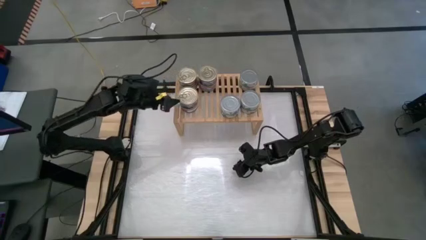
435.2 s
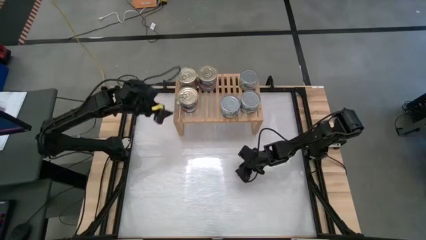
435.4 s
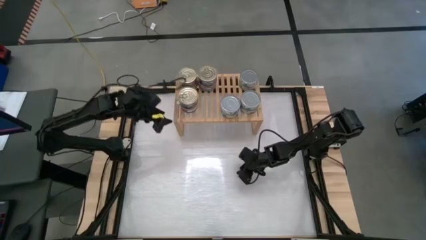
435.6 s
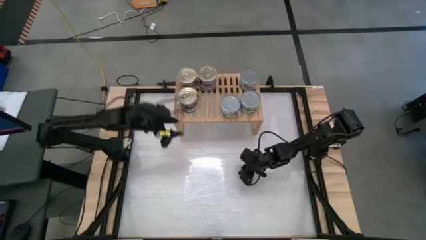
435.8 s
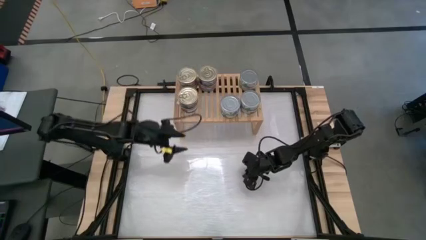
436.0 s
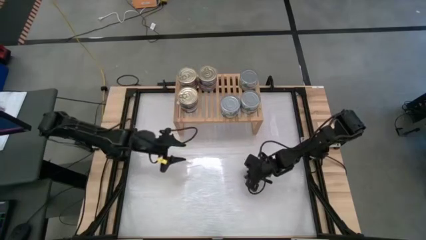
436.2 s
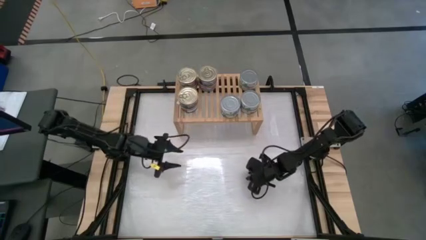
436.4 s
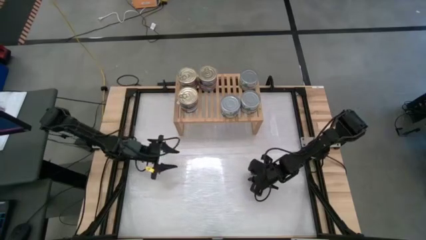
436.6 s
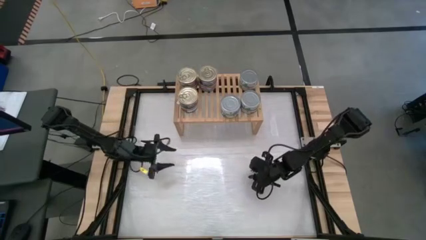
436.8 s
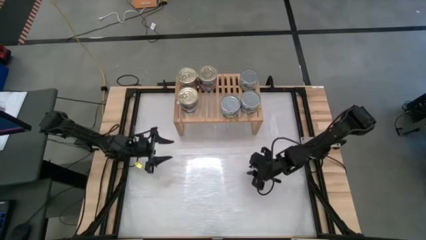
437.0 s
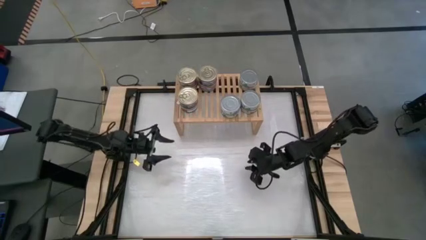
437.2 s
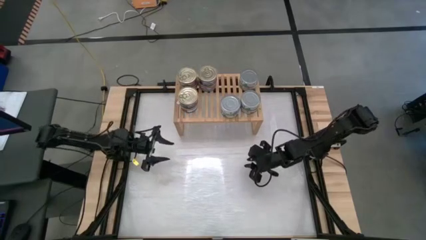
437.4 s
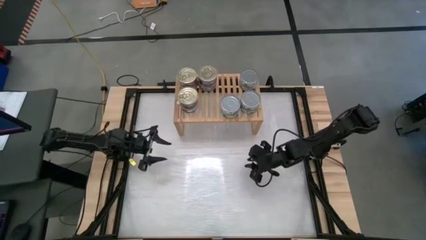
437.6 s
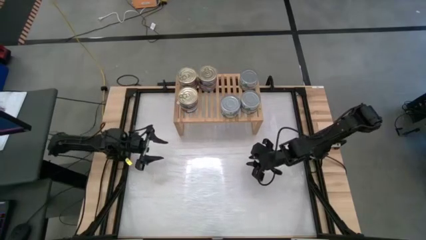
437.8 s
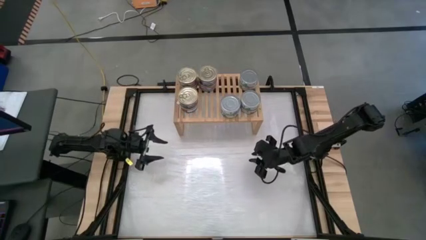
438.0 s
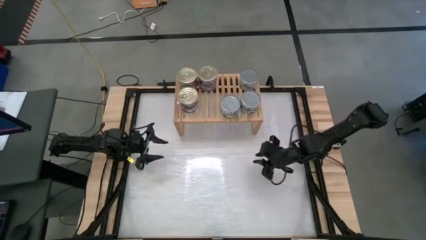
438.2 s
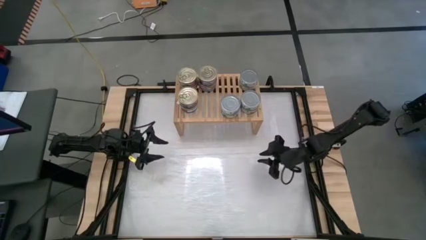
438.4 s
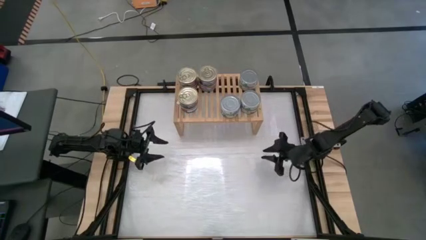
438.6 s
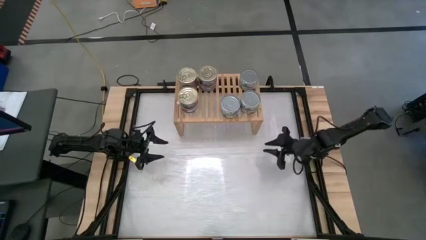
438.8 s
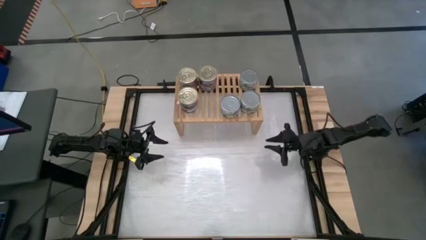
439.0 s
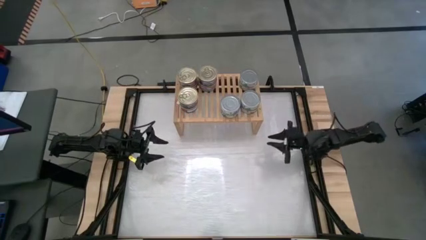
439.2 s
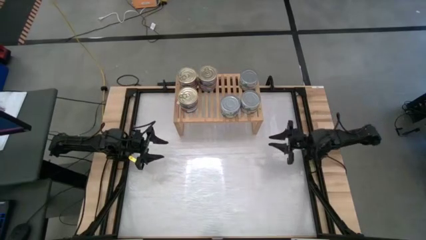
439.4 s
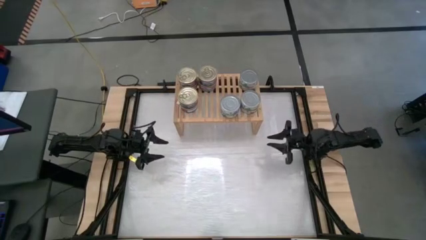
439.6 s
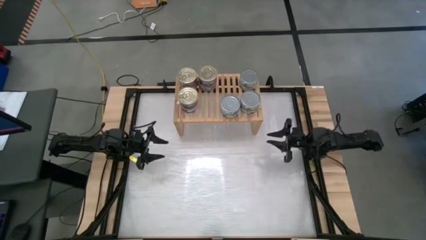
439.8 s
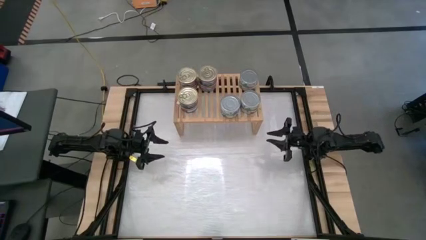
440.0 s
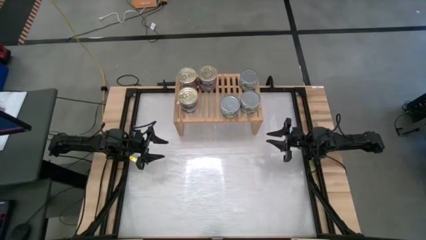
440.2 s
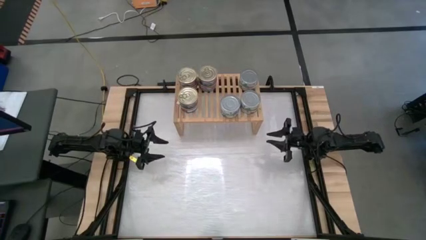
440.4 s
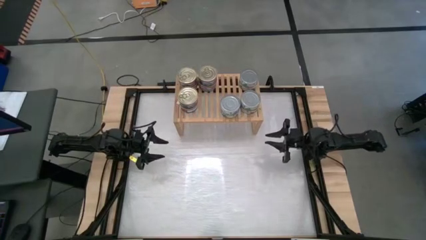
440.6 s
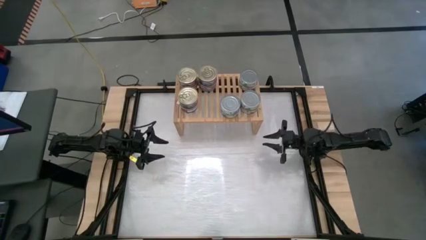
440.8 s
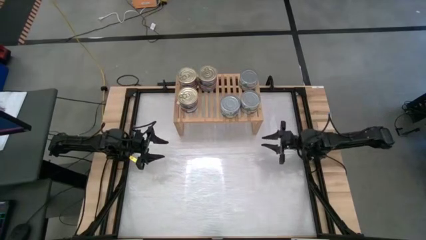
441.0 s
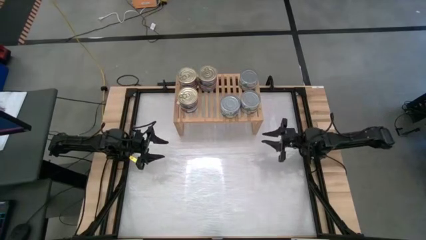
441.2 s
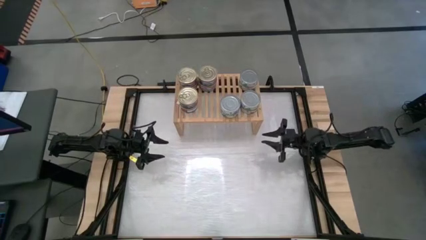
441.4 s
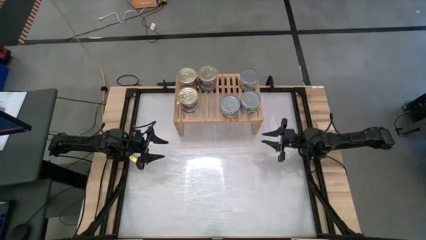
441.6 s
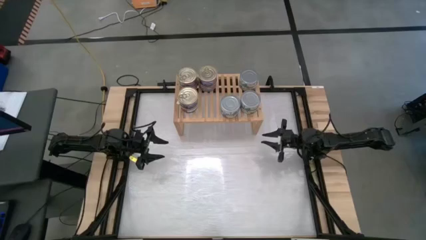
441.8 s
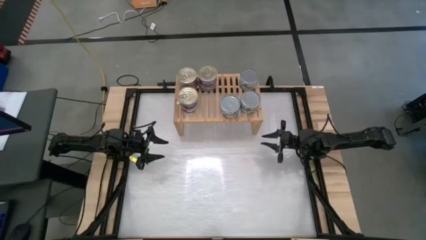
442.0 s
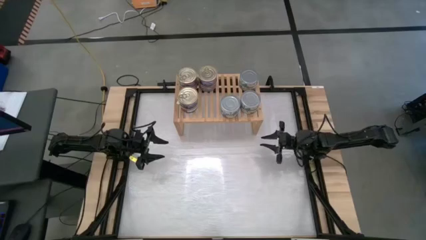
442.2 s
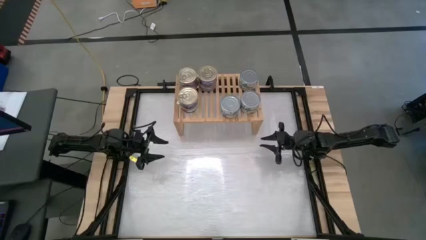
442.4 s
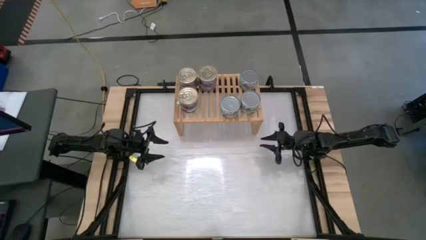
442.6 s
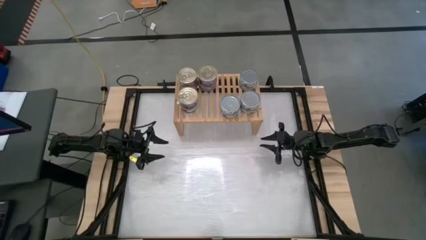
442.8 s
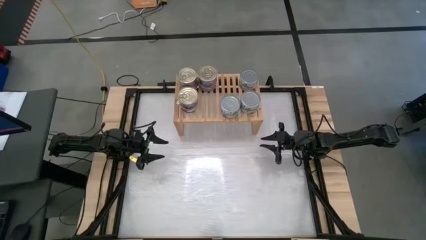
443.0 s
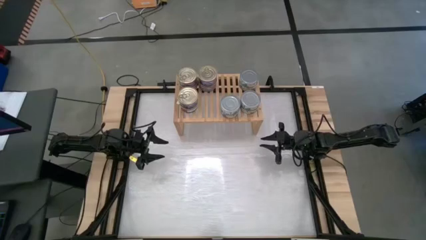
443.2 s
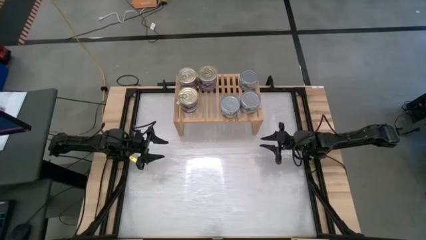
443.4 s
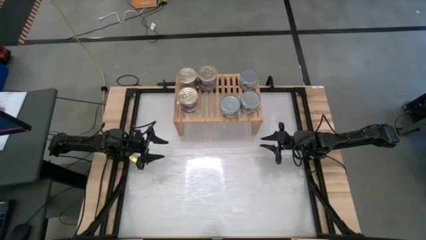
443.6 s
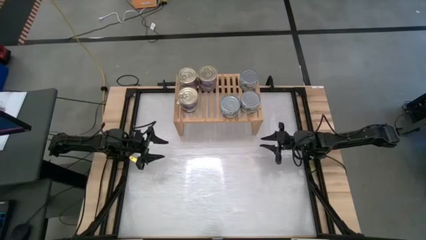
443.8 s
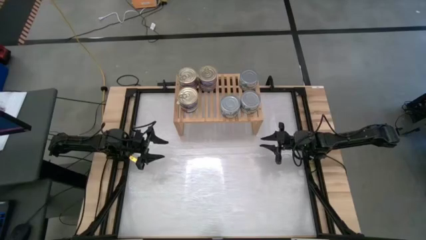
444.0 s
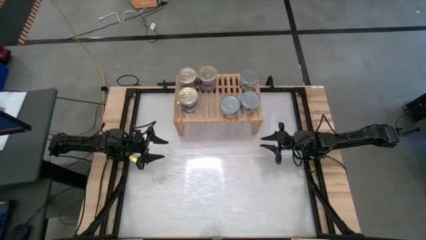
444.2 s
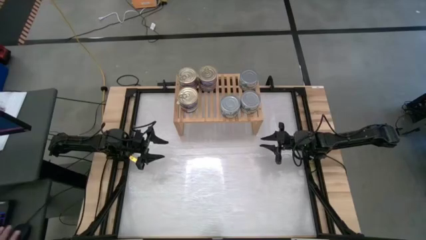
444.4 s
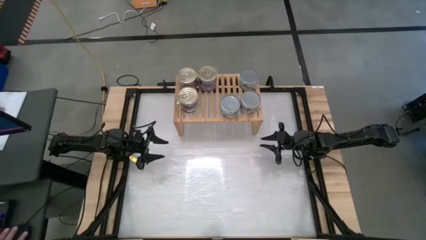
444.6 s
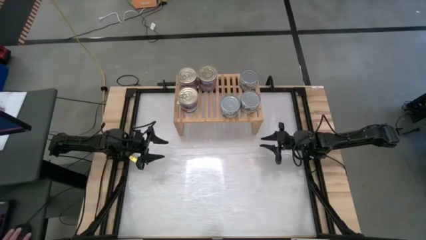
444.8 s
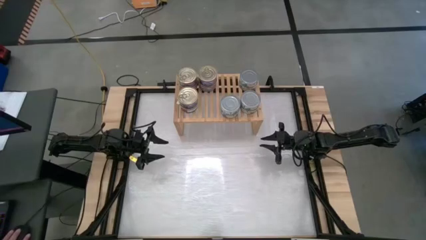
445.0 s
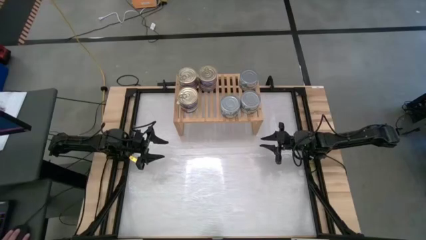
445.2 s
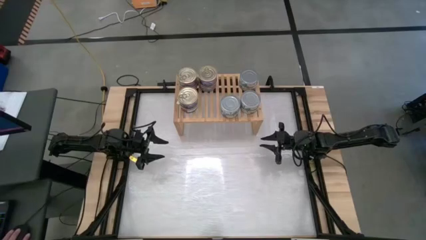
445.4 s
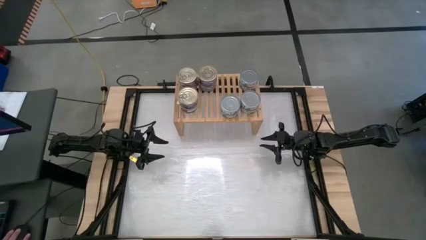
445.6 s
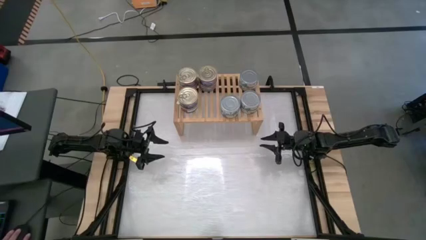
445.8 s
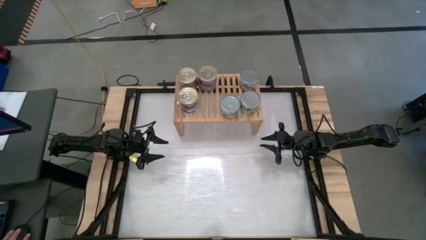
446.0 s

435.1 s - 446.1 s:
Task: Stack canned seafood by type on shelf
Return to Home Position
